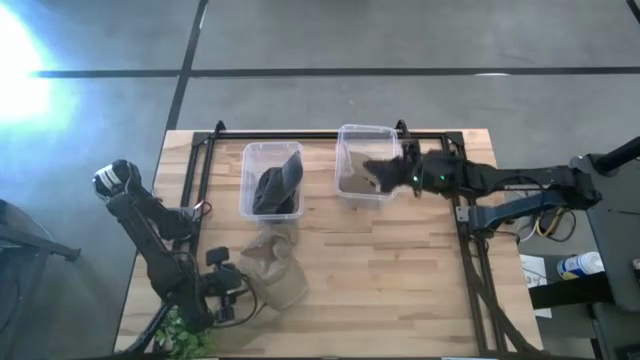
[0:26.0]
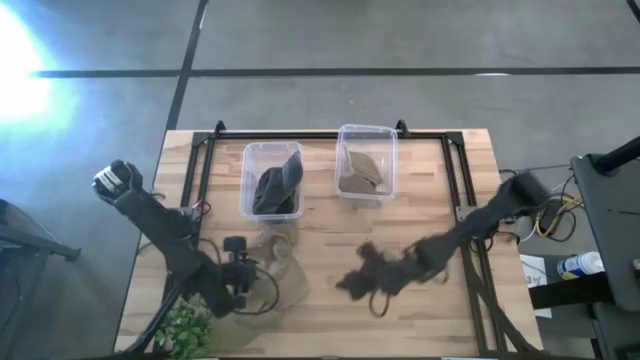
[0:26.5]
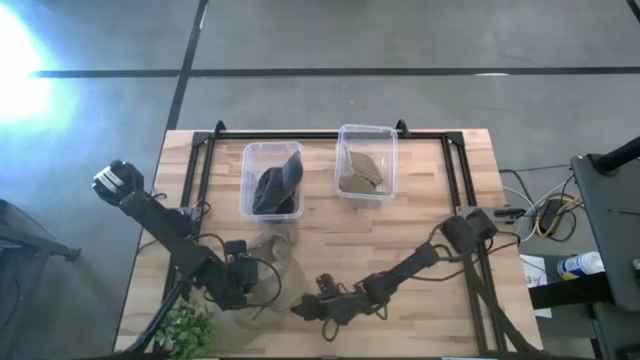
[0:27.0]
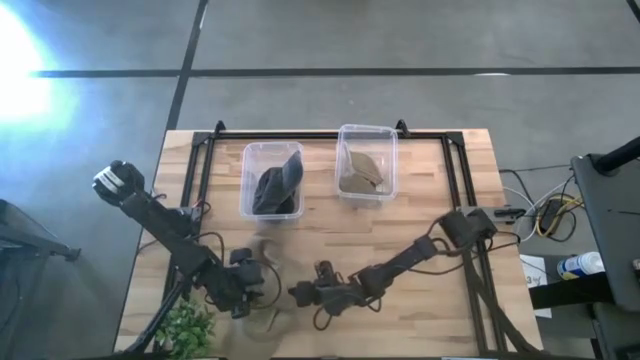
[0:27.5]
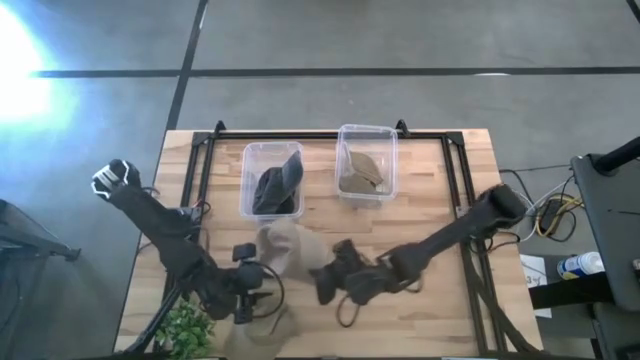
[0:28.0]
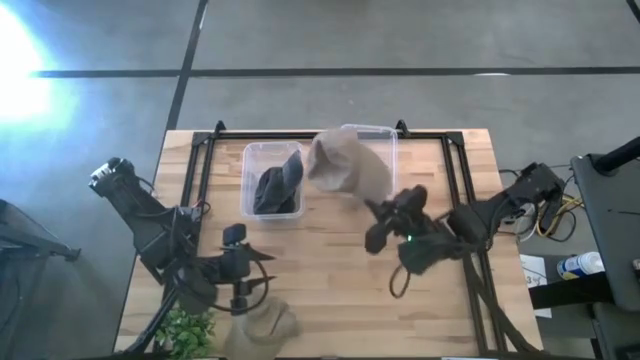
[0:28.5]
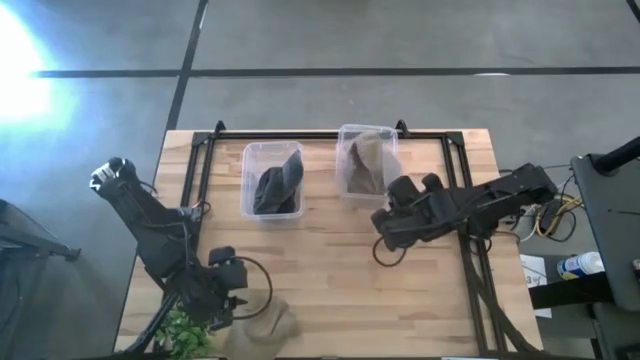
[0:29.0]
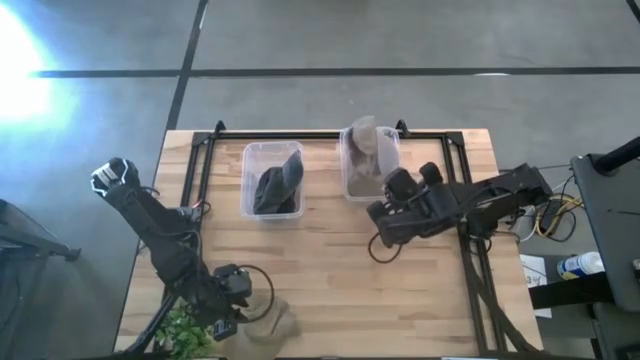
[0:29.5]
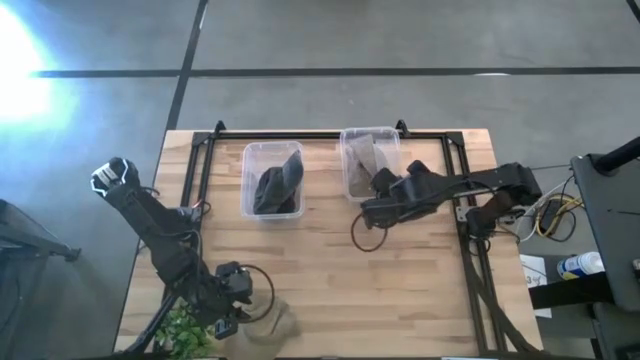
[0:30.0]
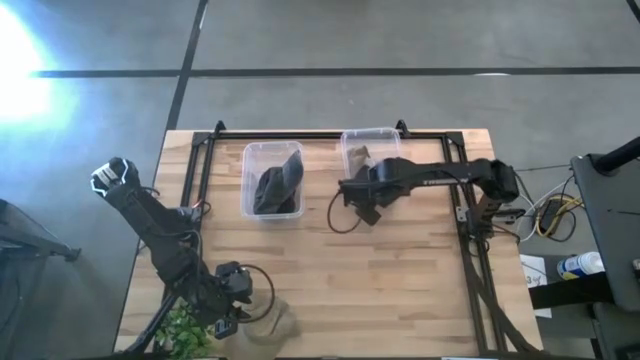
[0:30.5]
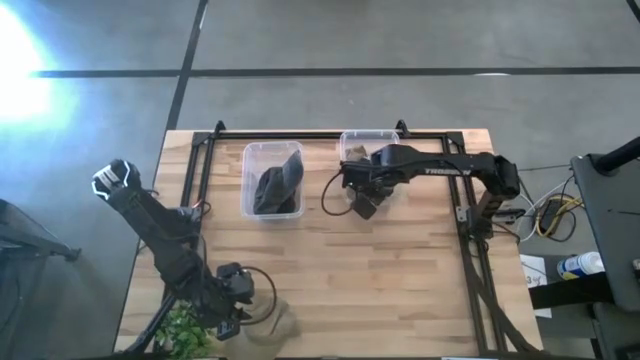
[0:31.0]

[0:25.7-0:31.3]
Task: Pick & Place hat
Put the top brown cap into the right transparent bin

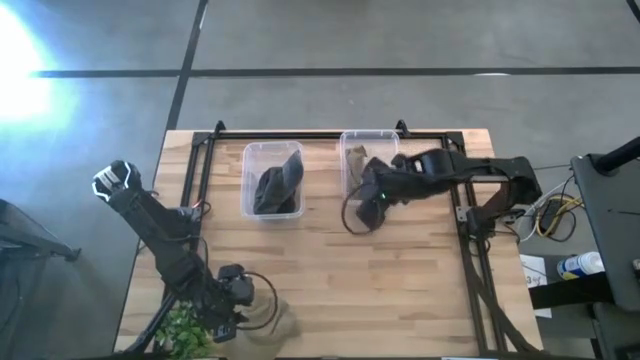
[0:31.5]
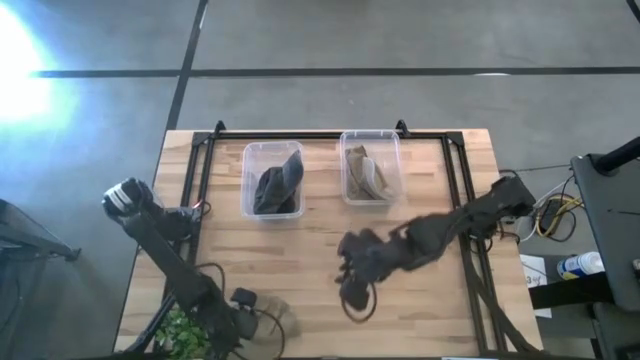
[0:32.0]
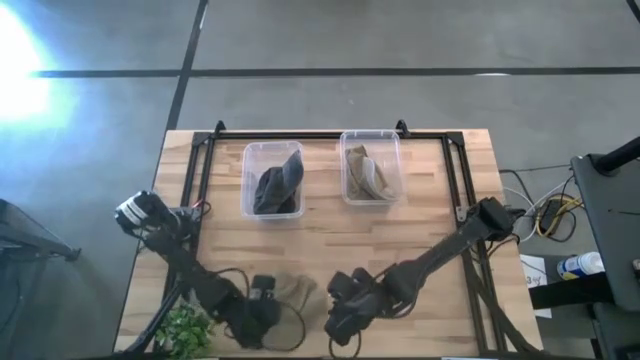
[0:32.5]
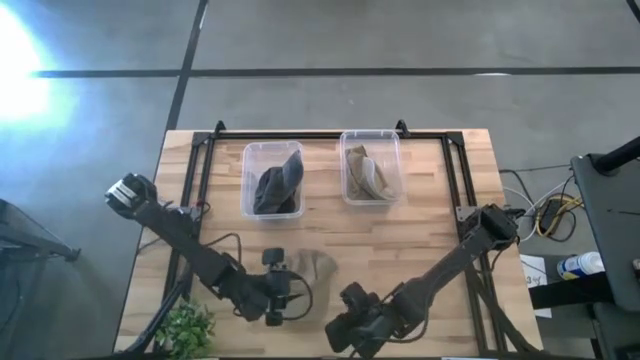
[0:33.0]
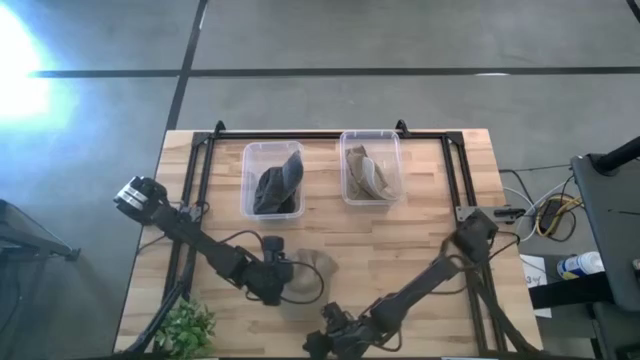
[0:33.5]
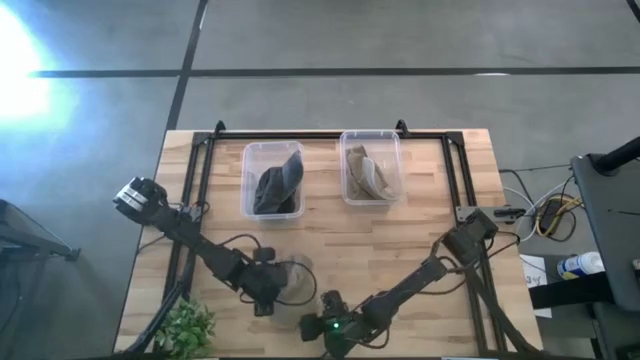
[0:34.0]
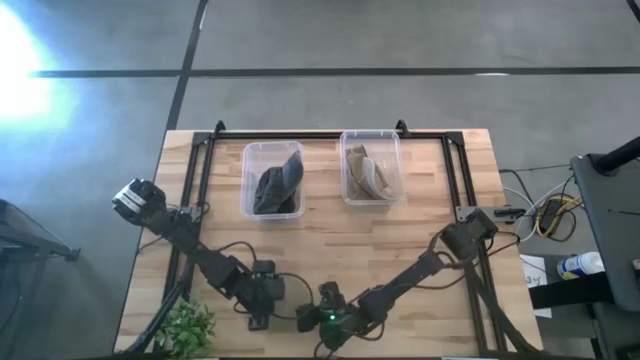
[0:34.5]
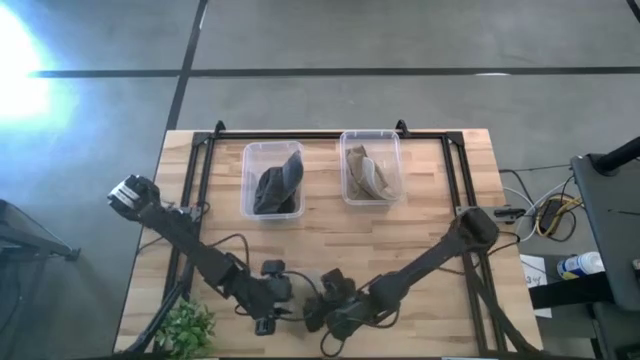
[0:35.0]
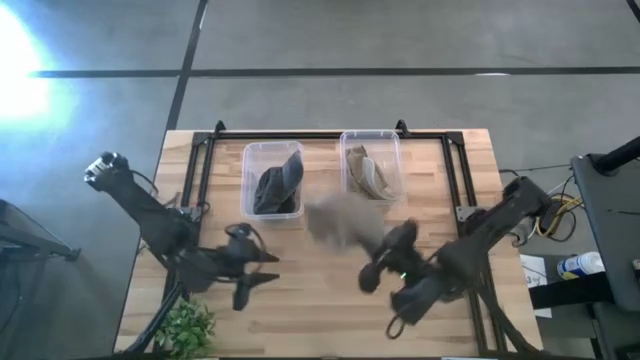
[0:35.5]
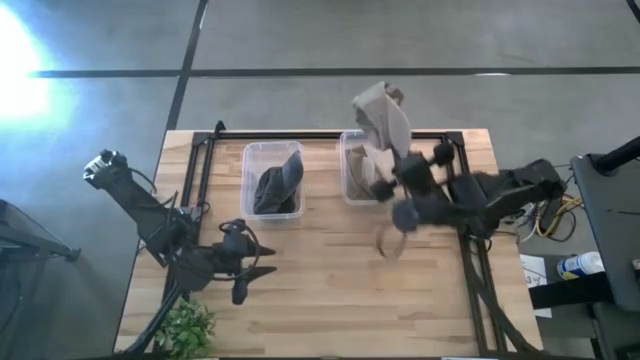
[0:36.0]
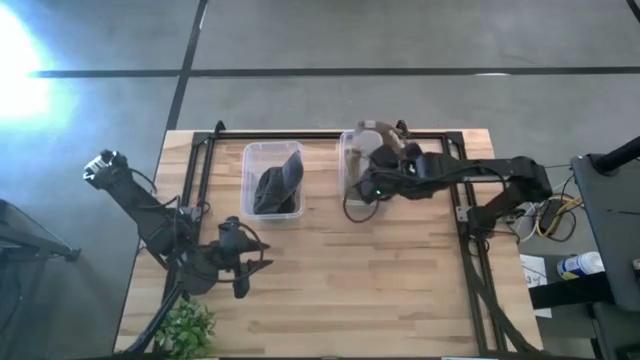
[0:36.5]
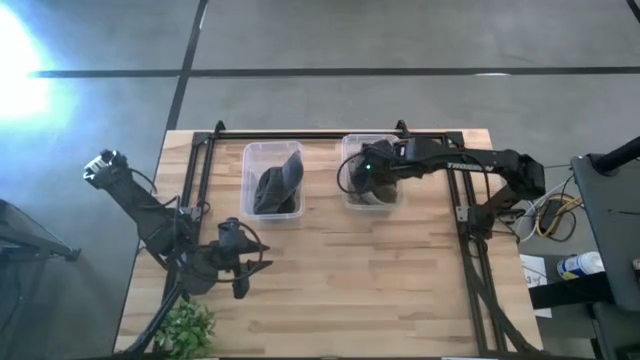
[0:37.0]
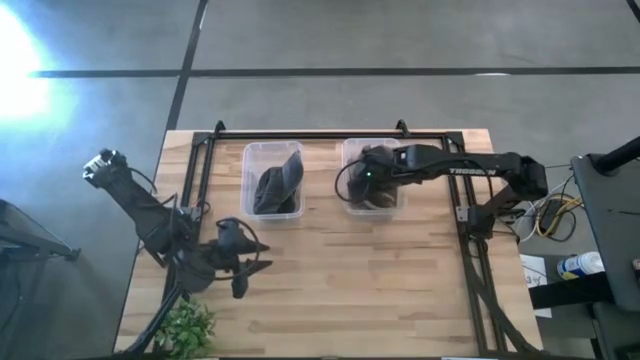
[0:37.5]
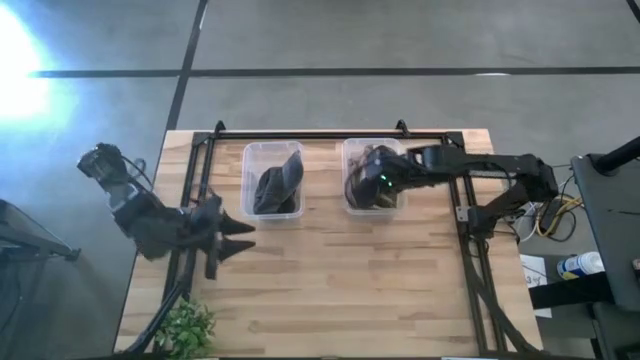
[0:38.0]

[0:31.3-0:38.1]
Put the brown cap into the right transparent bin

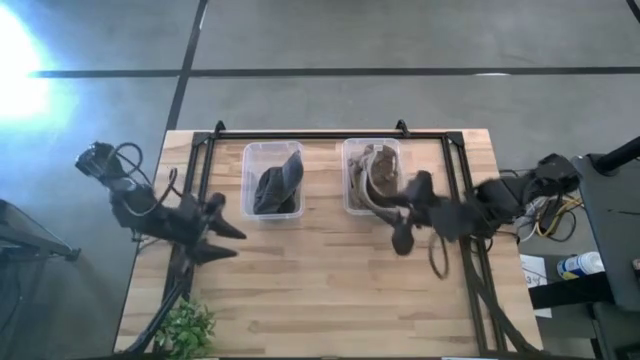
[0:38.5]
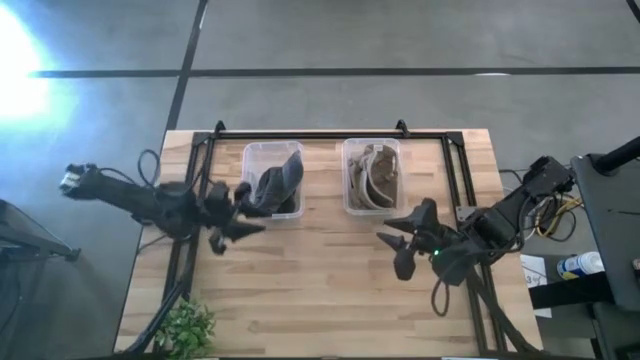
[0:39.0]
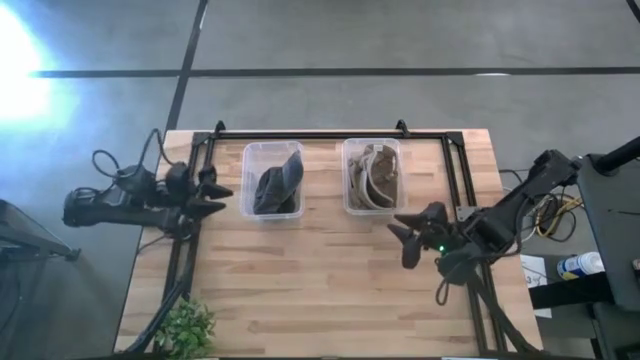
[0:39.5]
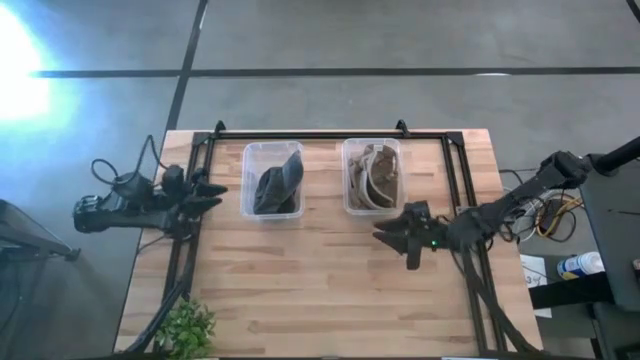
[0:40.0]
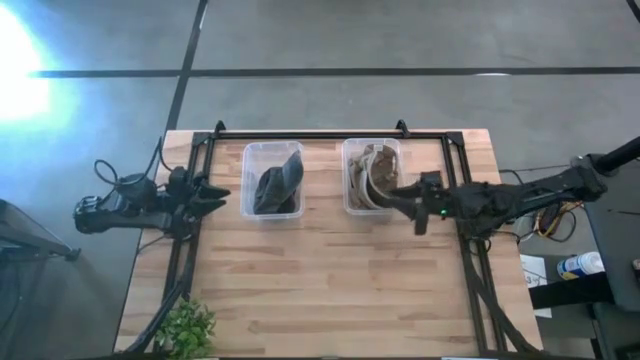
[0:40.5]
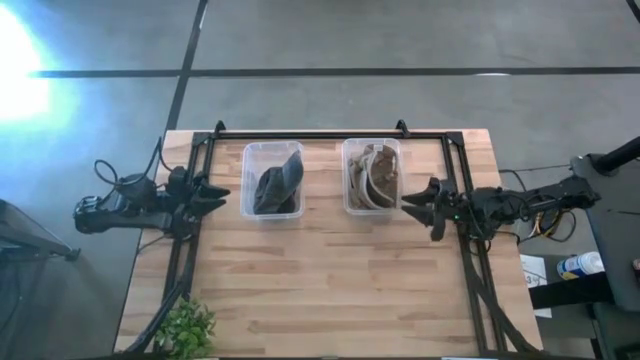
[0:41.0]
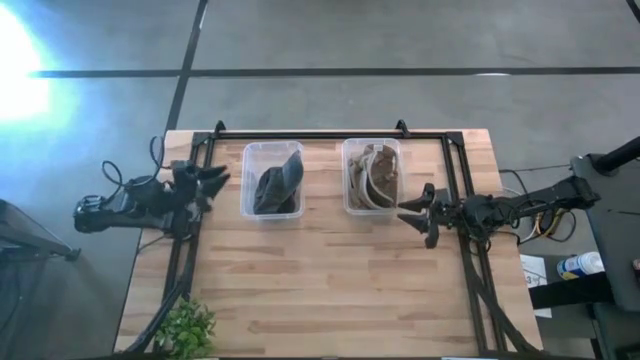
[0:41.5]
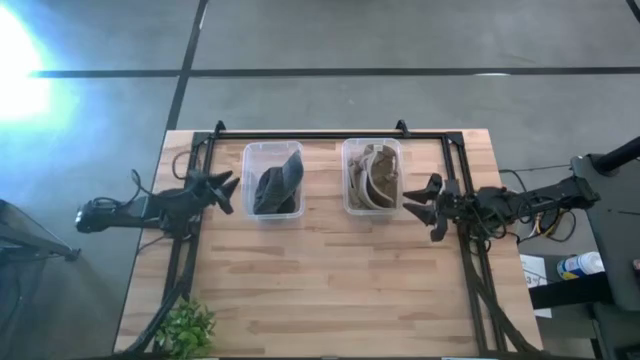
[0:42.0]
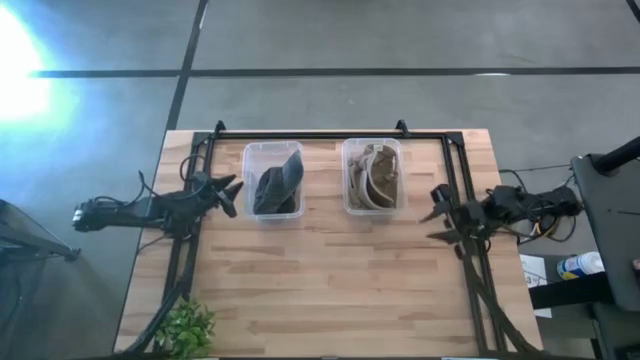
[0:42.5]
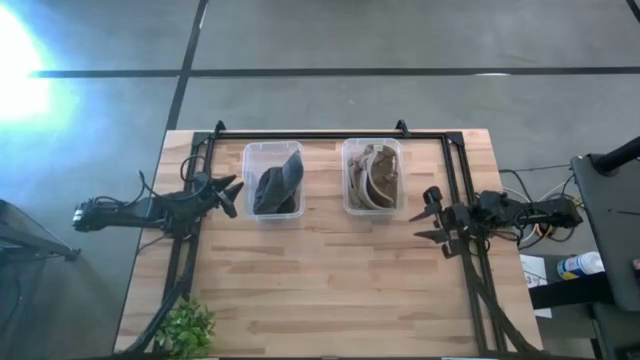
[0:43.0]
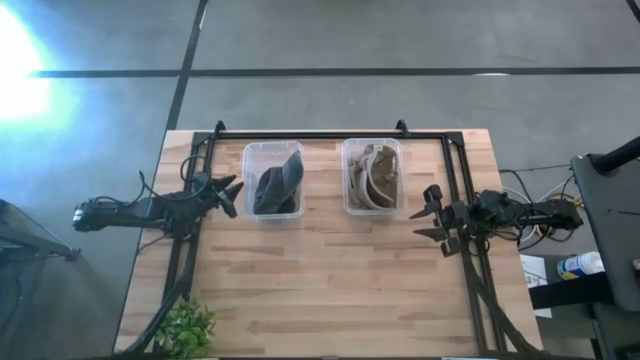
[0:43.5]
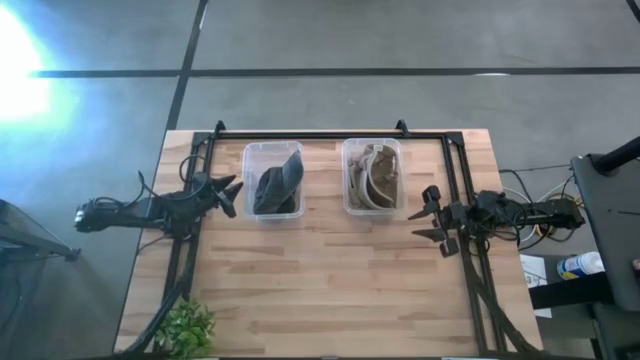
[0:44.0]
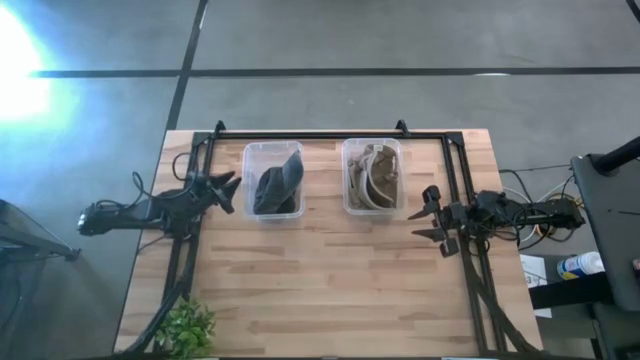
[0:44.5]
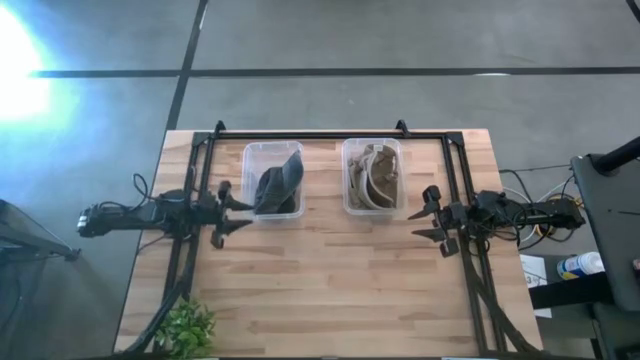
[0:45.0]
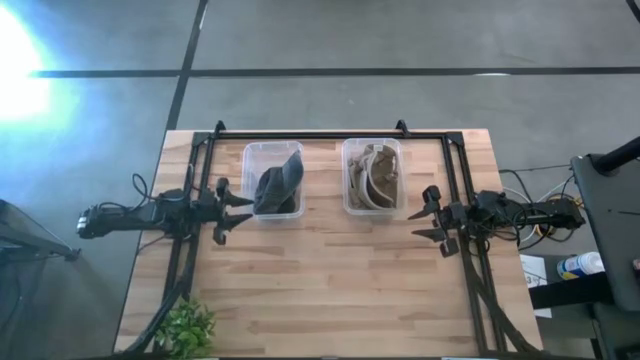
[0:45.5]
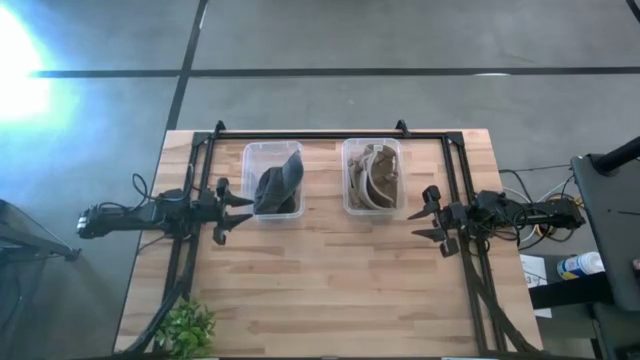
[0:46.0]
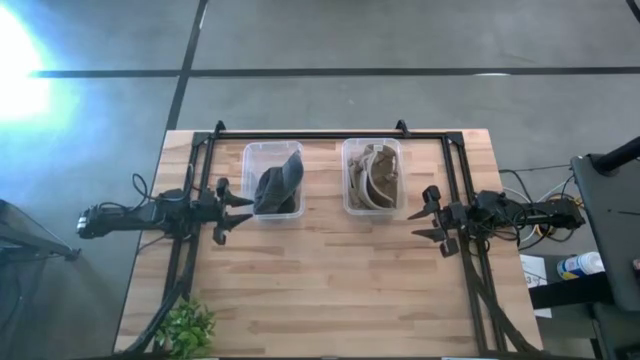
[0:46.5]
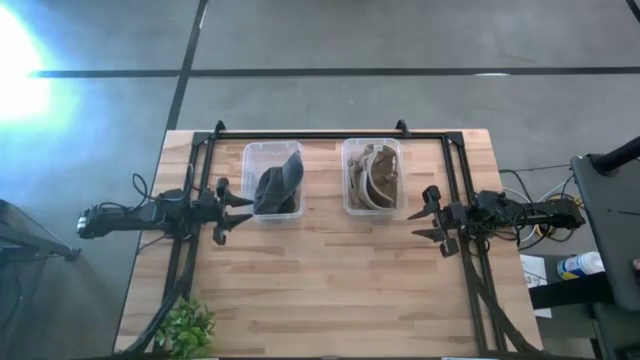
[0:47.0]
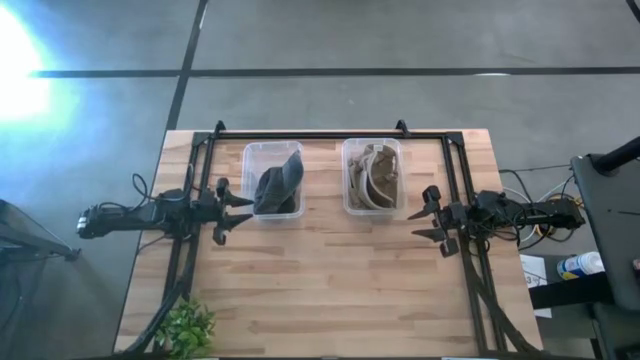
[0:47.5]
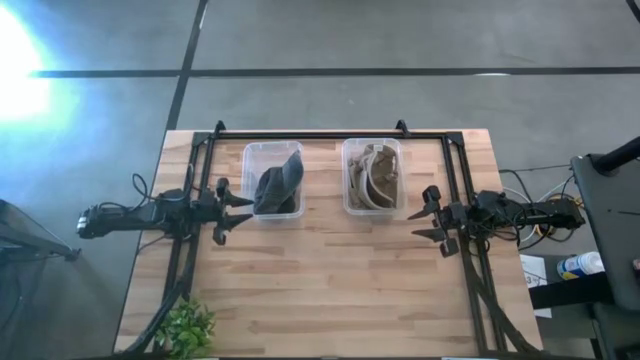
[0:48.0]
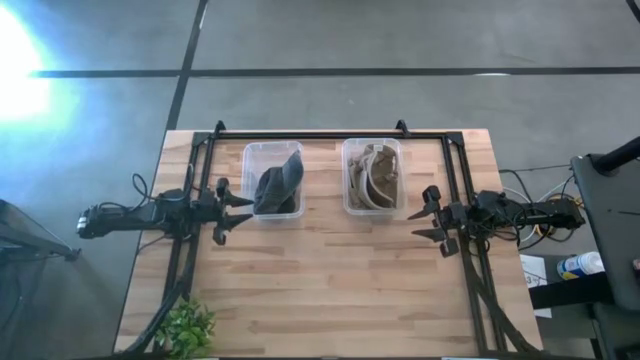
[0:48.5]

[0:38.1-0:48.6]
Return to Home Position
